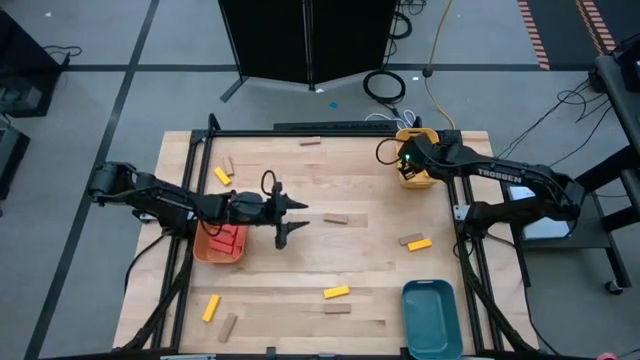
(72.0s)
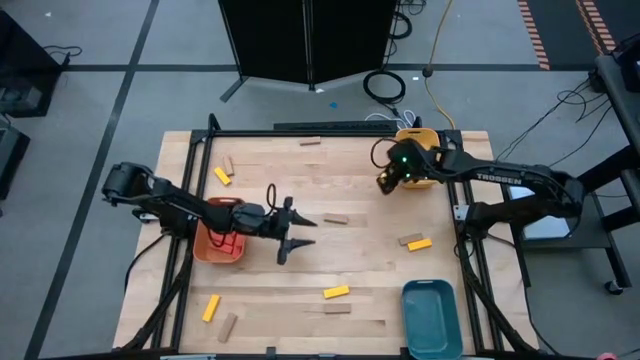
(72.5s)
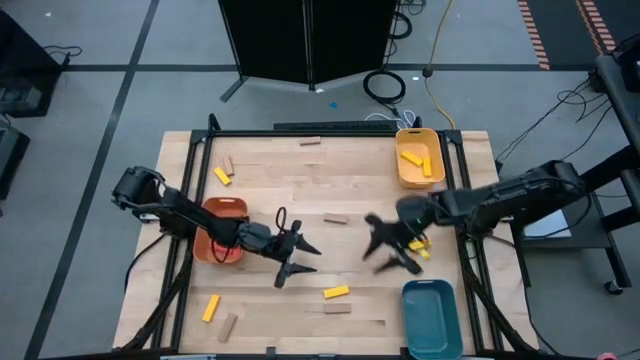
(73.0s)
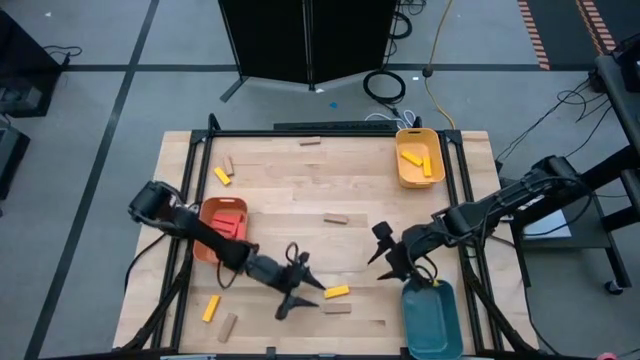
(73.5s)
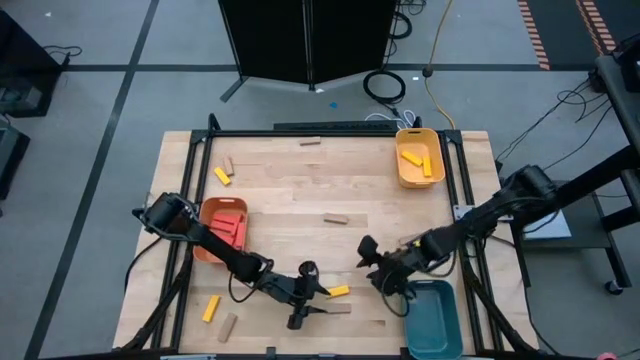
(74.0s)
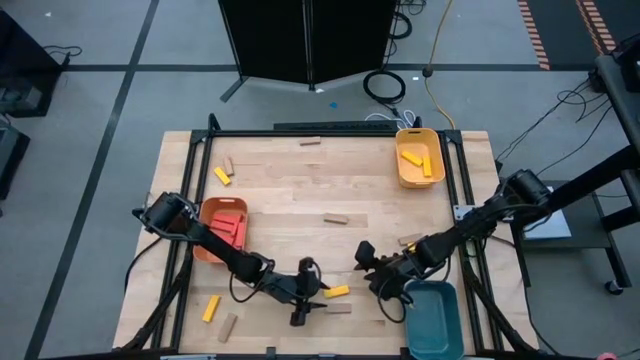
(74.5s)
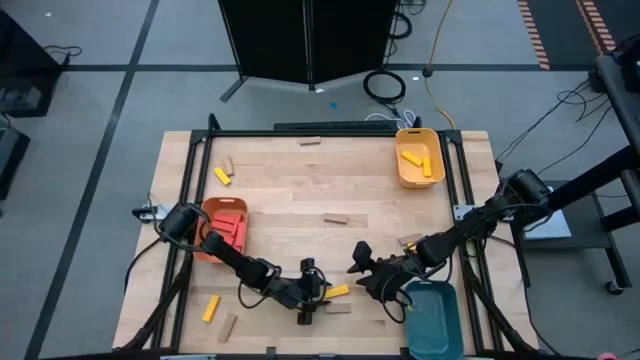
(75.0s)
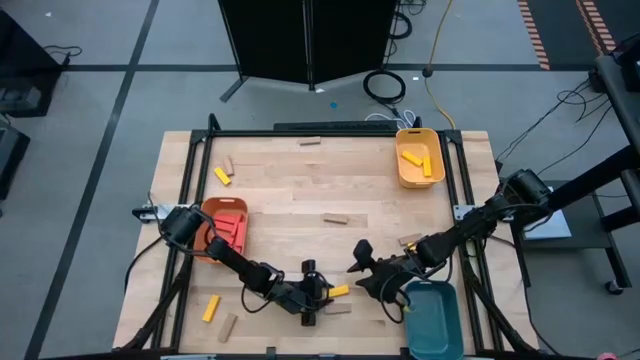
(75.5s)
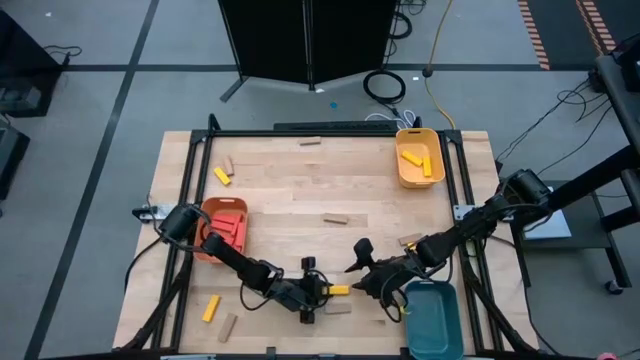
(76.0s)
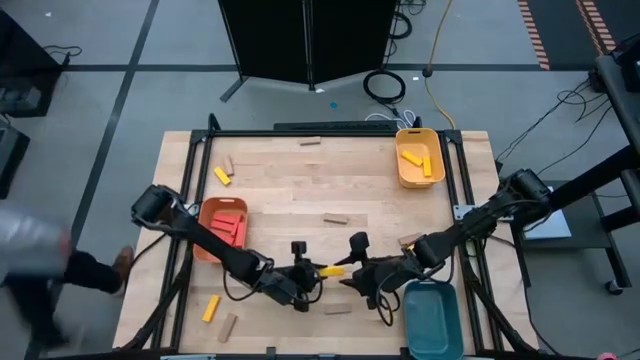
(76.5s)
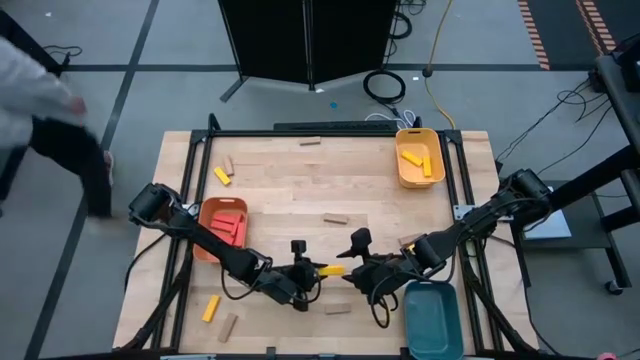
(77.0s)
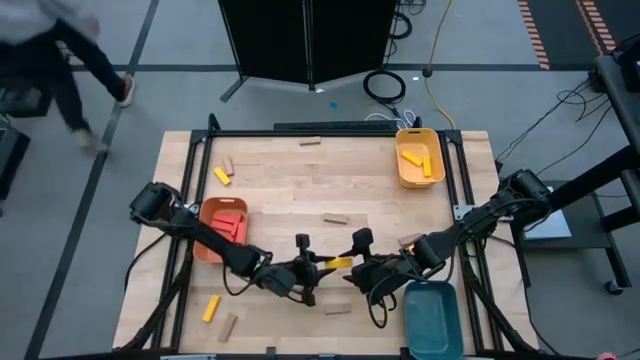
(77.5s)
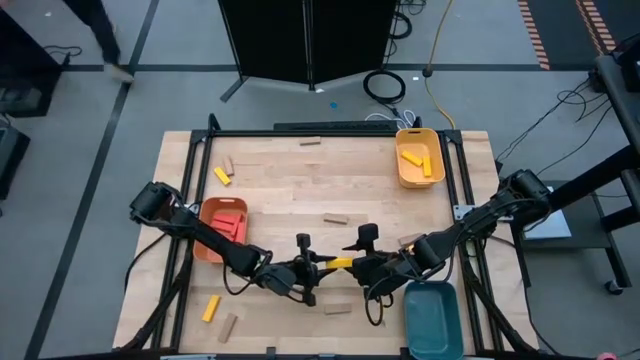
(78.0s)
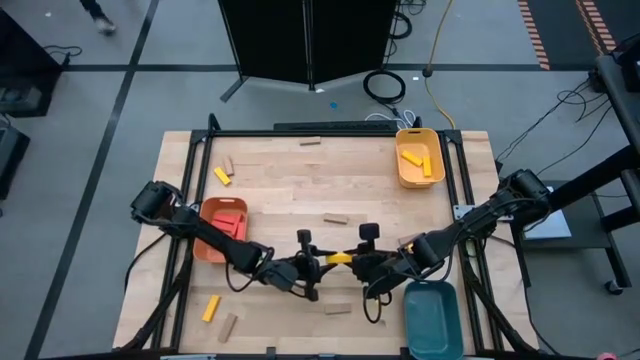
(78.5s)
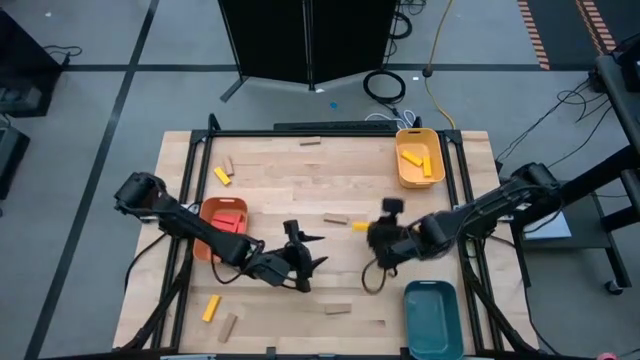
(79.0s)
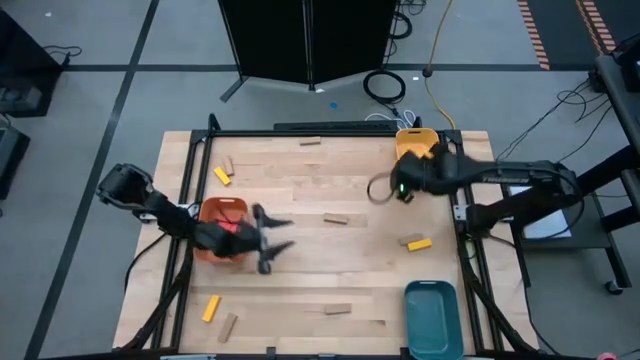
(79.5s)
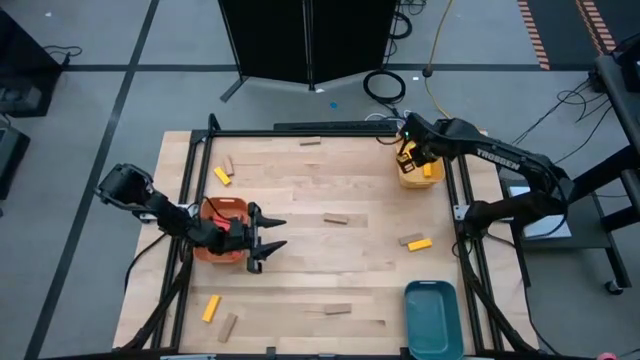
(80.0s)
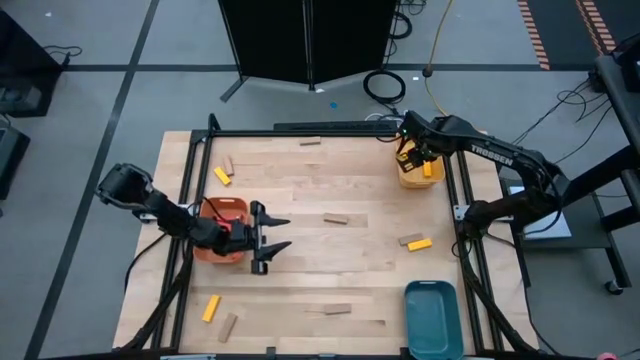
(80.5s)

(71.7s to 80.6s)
Task: Sort blocks
Put the yellow block into the yellow bin

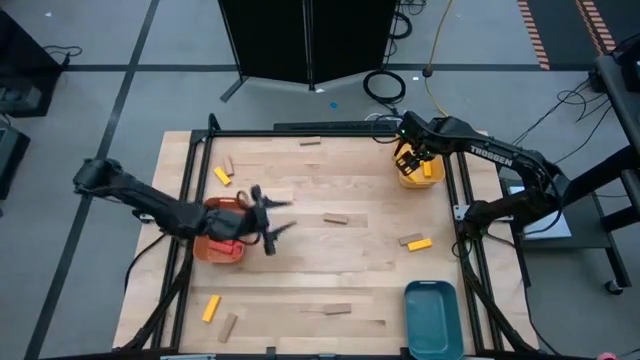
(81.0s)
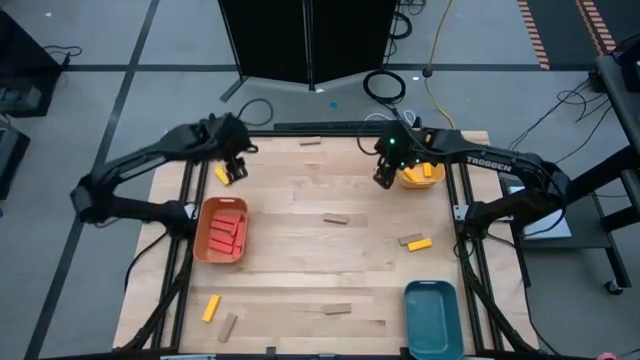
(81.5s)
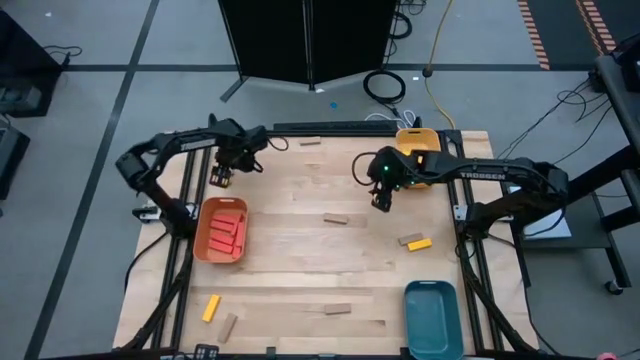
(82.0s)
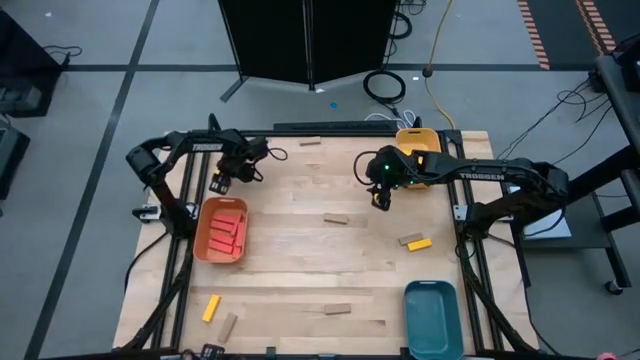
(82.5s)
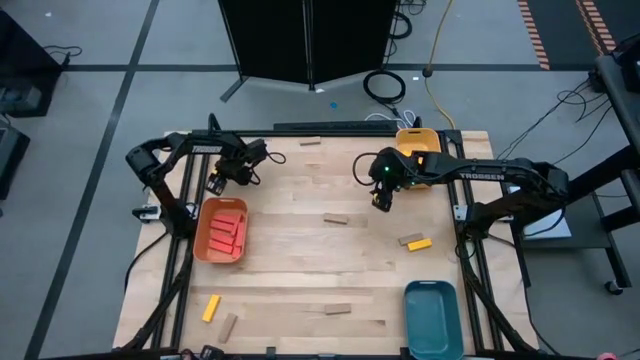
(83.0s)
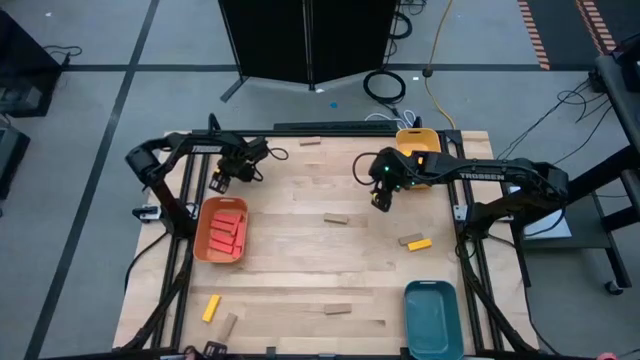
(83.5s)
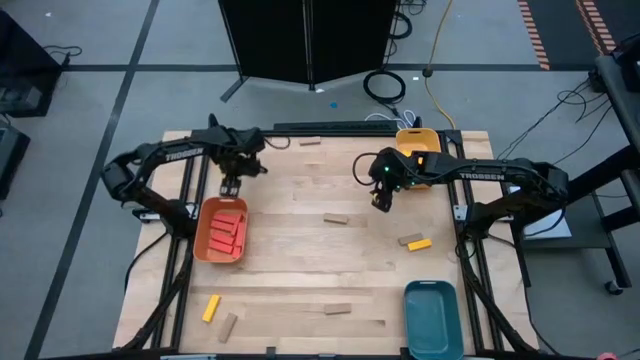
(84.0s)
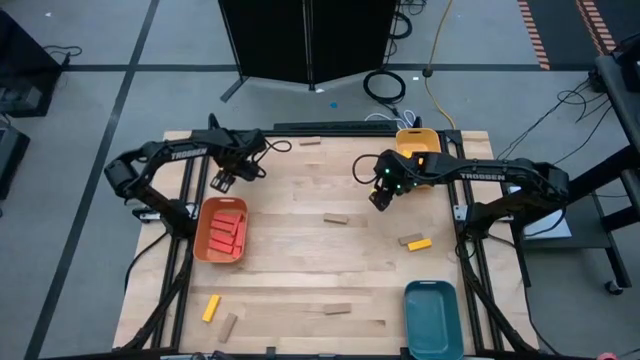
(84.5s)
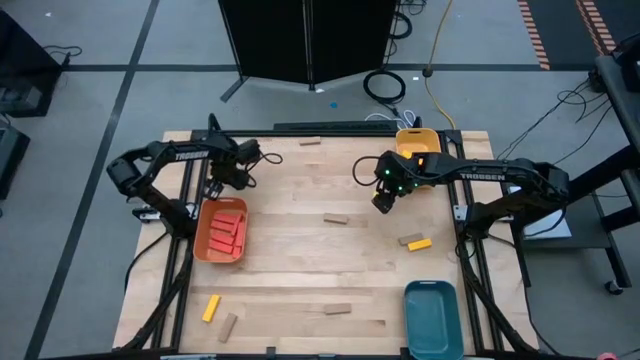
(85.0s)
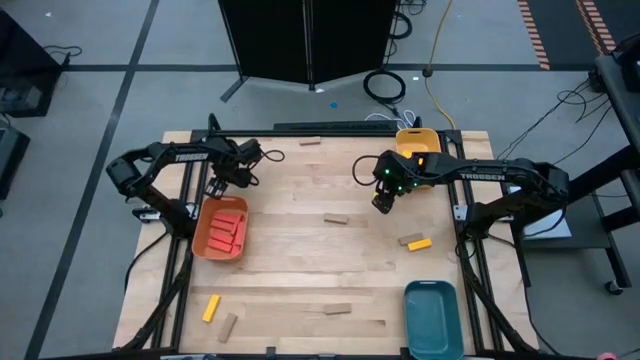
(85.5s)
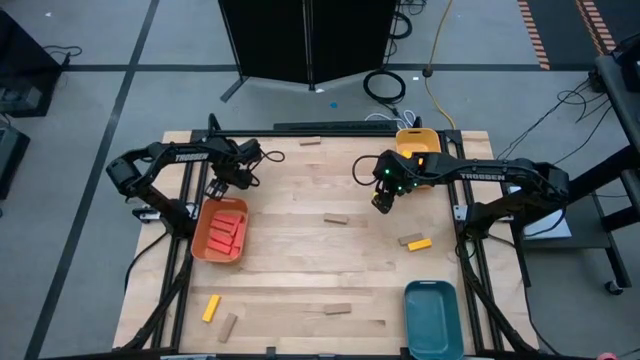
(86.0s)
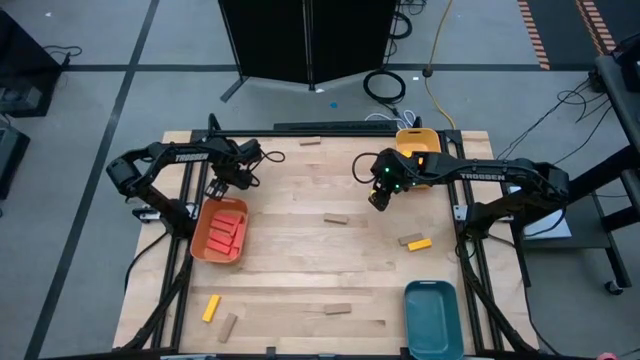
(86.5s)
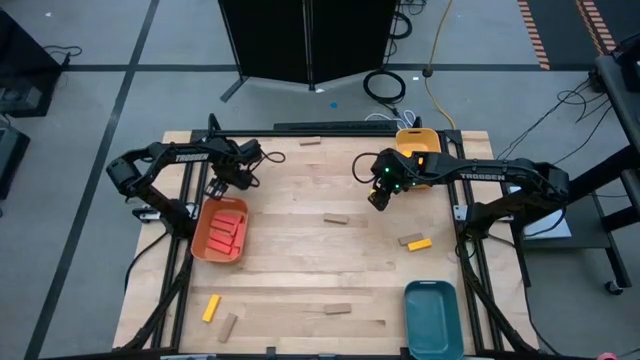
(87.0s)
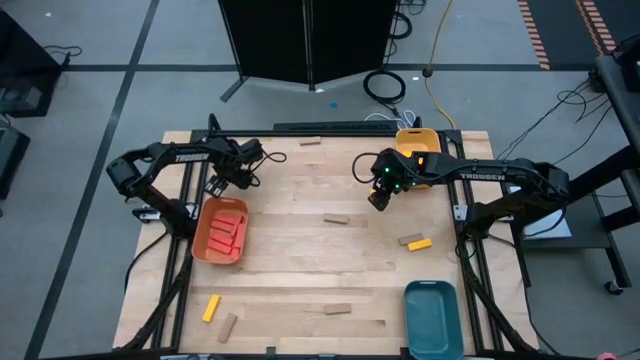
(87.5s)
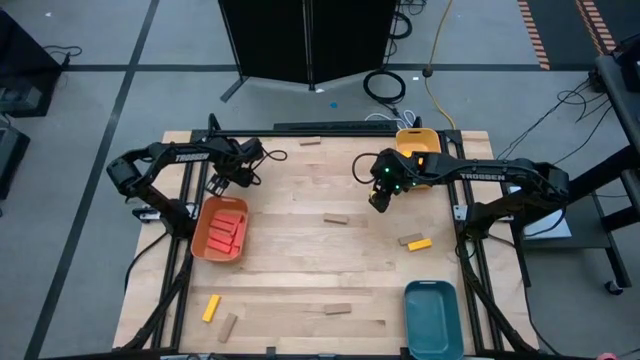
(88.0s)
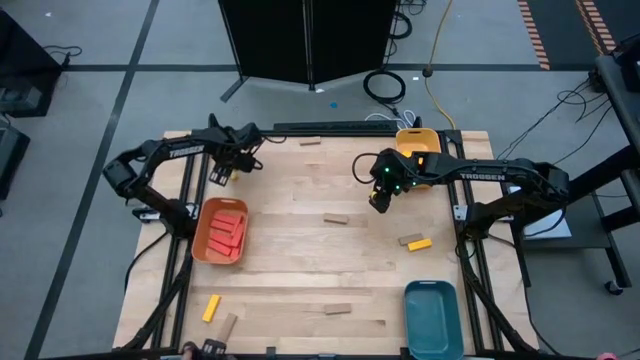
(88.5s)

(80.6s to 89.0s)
Put the yellow block into the yellow bin

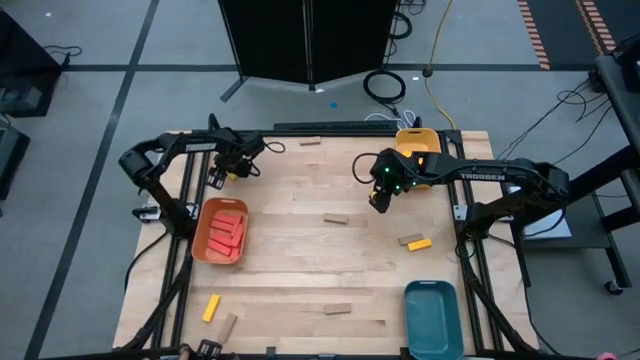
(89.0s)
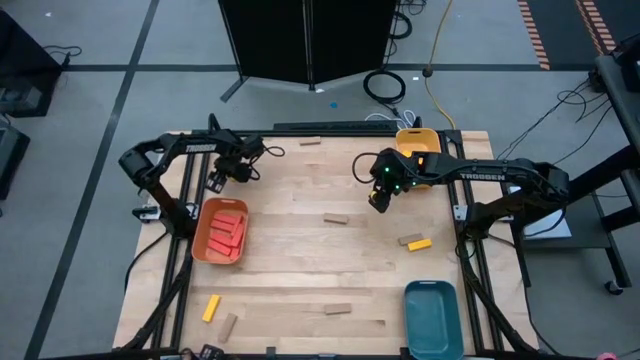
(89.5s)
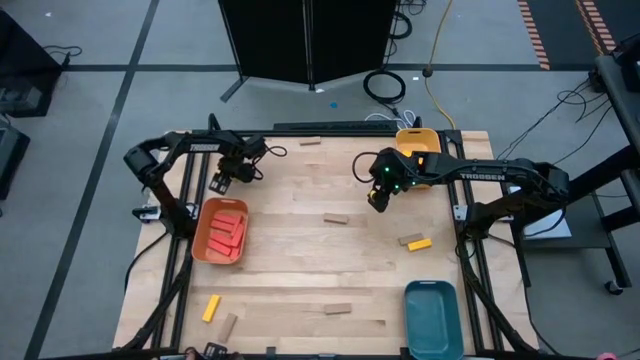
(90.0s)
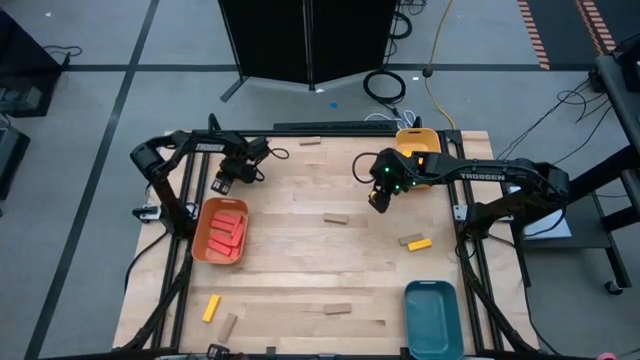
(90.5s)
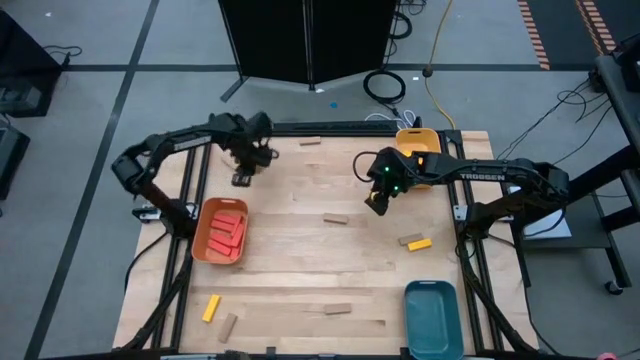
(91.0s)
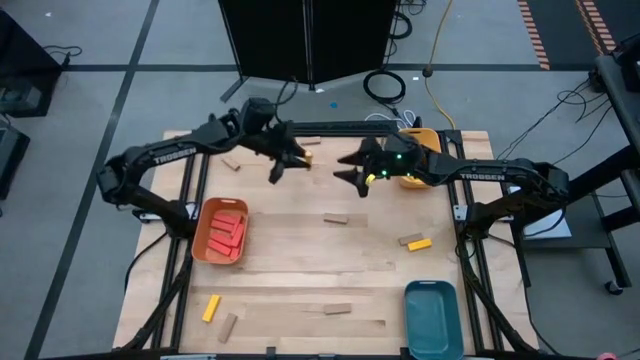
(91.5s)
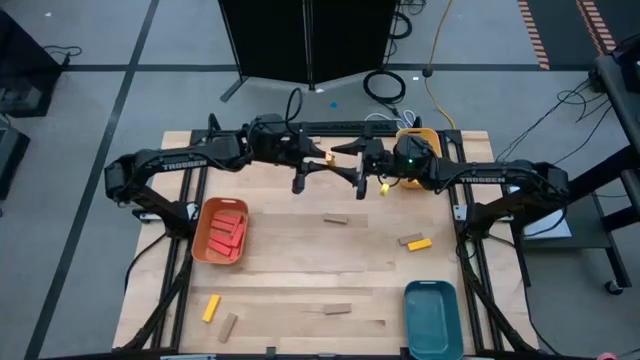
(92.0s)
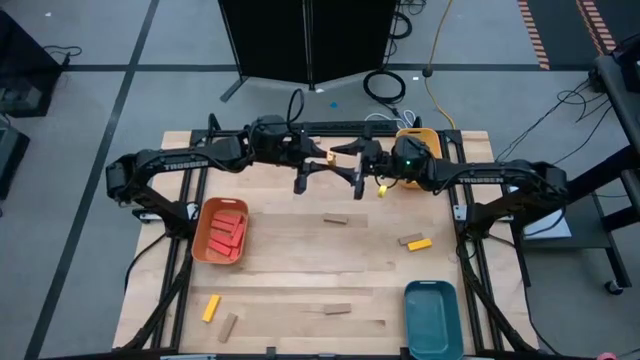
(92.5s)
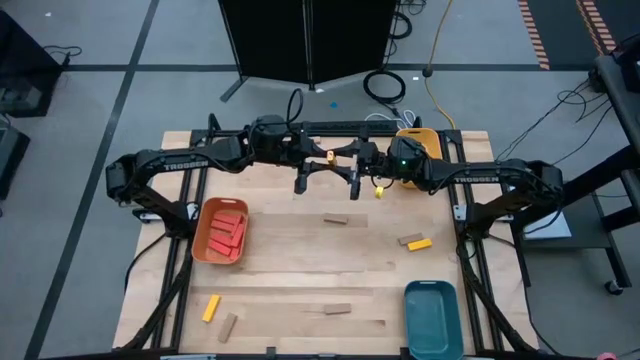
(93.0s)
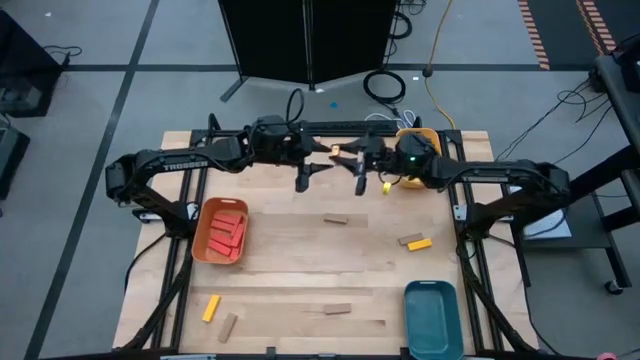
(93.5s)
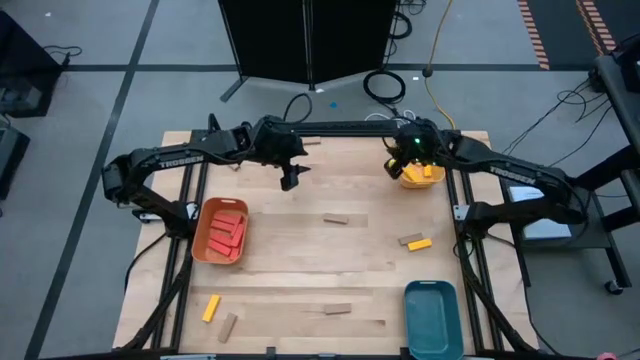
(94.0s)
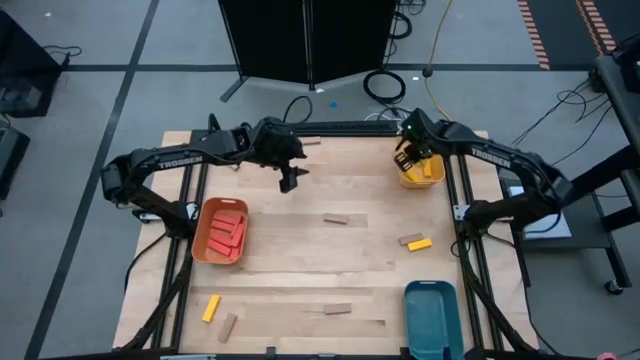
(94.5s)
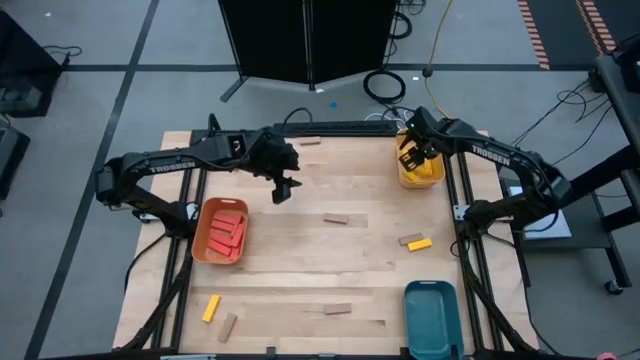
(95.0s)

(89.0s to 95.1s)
Put the yellow block into the yellow bin
